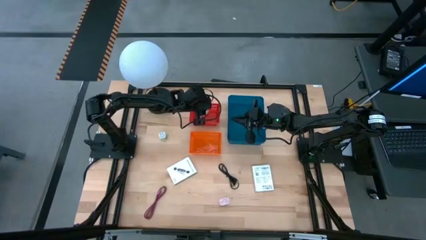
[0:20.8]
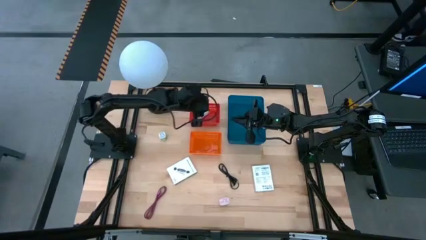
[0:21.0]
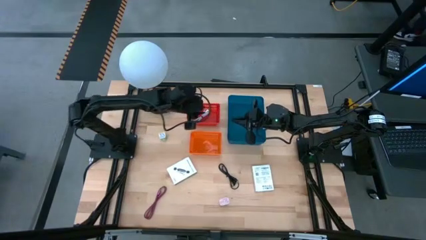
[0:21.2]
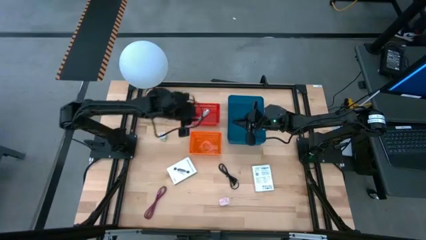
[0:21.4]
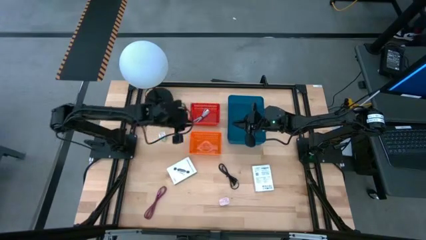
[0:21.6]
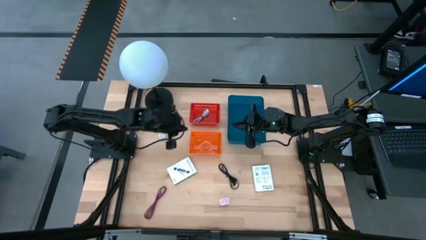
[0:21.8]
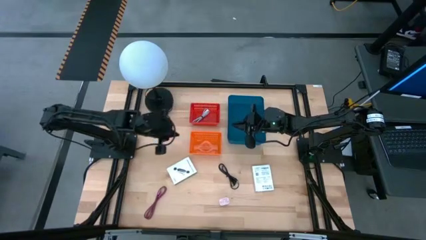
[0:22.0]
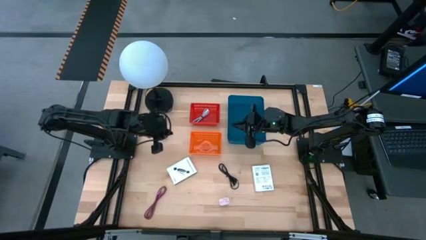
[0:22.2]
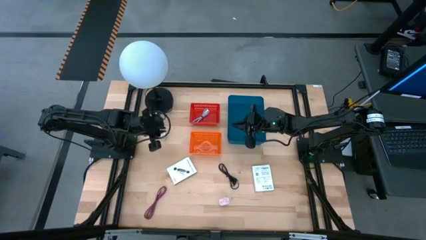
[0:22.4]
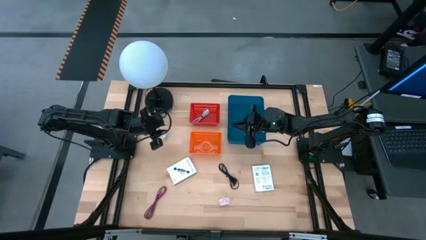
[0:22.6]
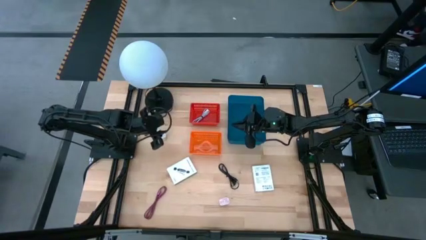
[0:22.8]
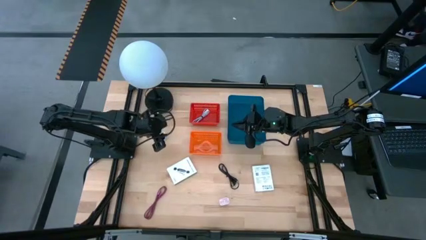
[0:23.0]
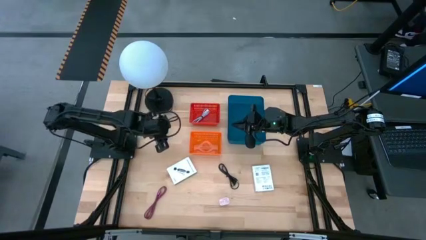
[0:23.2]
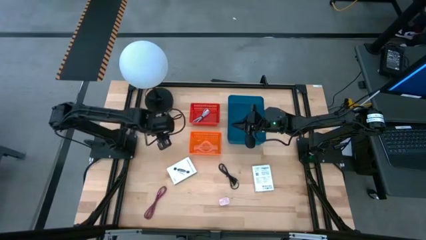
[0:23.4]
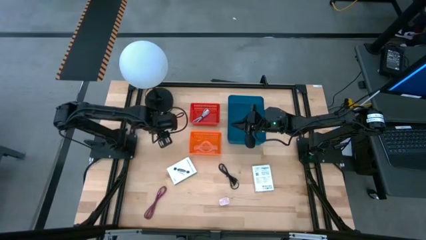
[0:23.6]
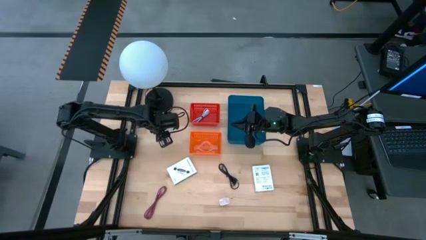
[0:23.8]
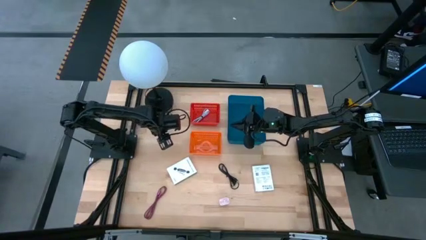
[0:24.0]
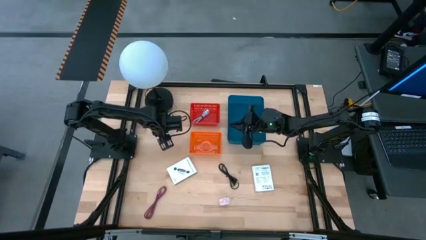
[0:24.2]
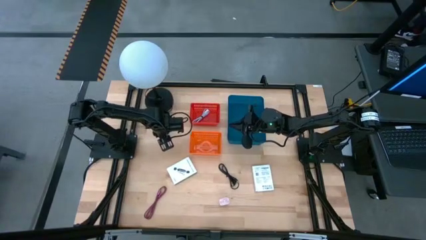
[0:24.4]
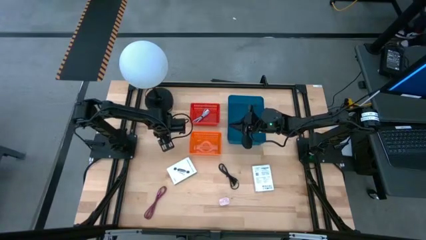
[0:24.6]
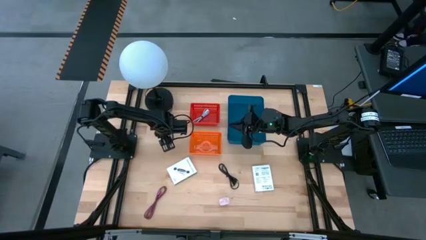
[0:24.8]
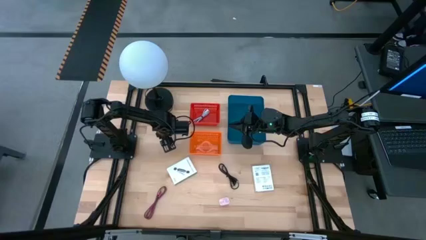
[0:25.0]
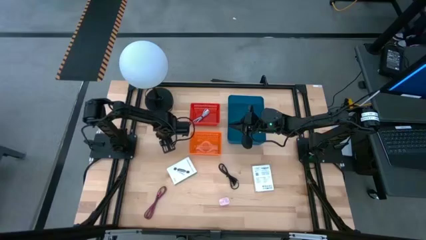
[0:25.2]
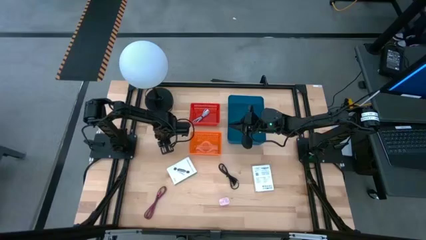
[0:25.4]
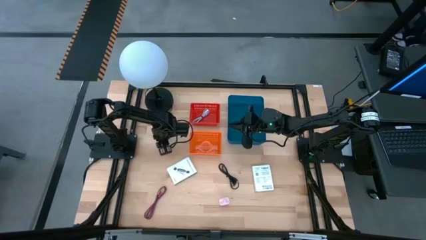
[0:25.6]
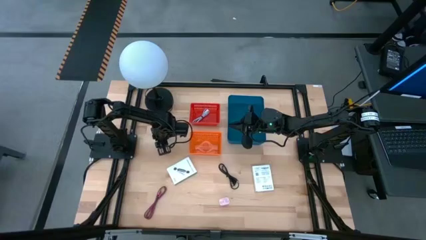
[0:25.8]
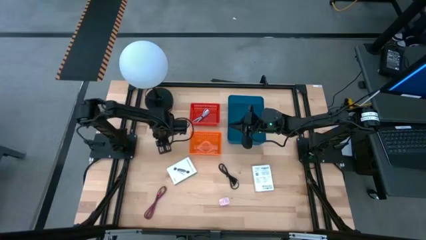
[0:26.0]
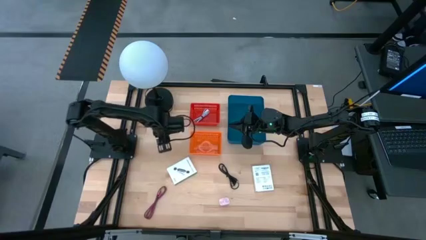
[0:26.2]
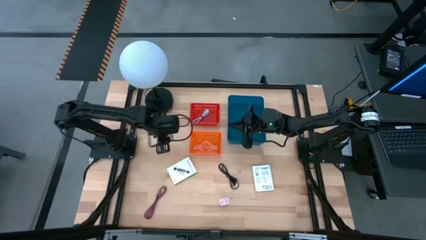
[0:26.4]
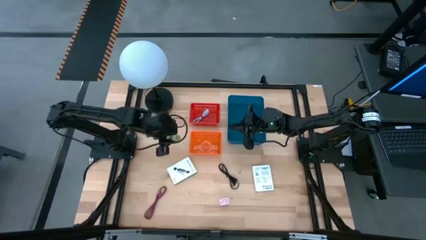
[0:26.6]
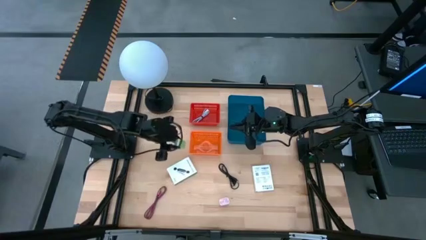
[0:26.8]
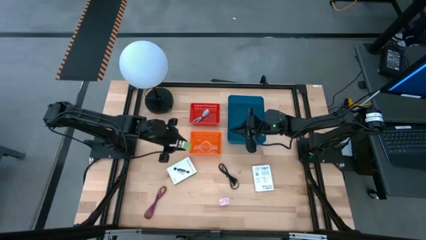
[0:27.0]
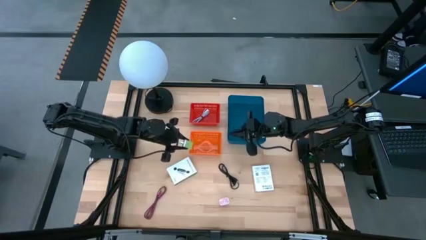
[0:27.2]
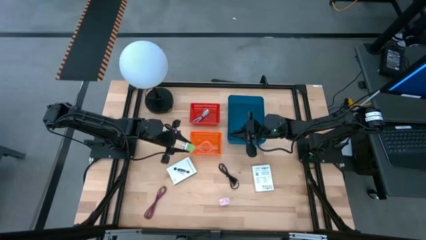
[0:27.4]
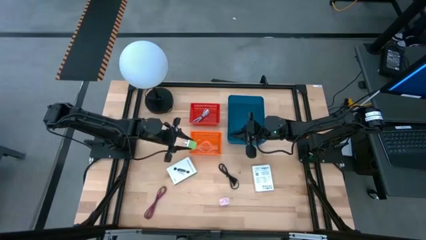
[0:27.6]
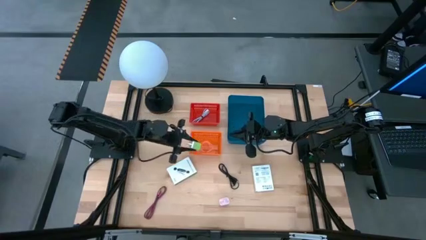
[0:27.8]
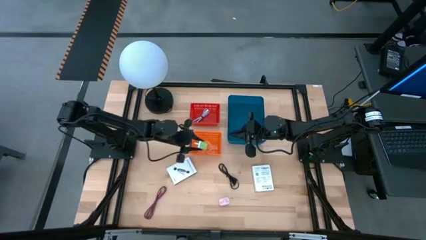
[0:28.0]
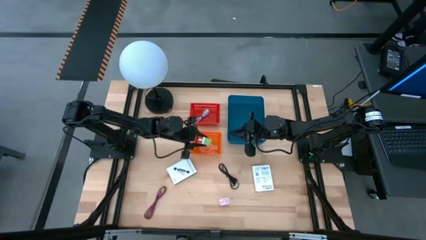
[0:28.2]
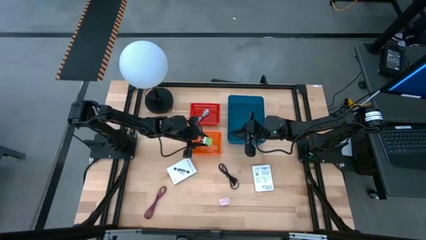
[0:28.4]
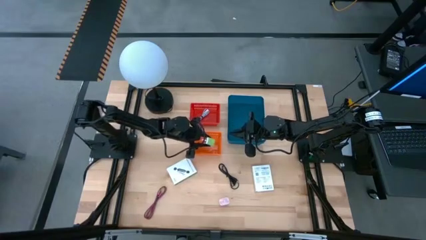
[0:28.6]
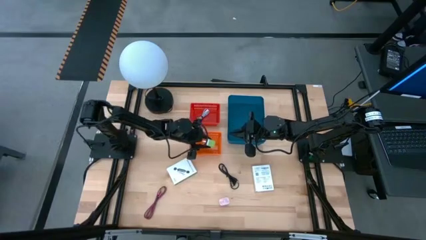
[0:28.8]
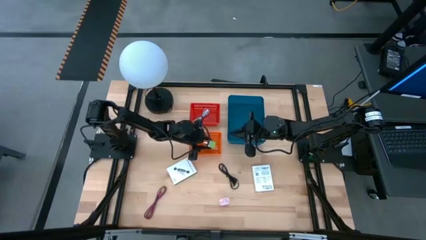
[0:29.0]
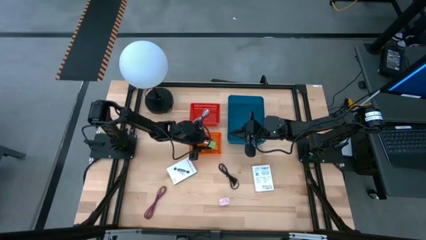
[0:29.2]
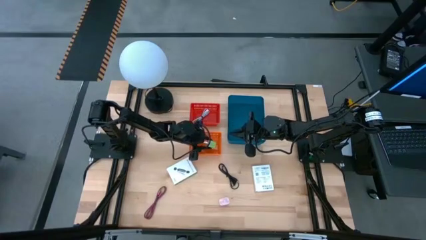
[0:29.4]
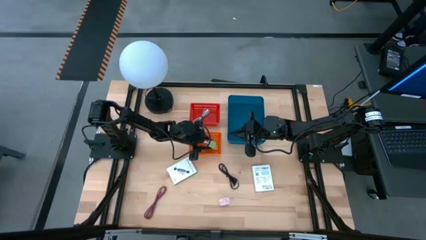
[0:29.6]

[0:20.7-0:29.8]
Task: Pick and place items into bin
Put the light green charger adapter into the orange bin

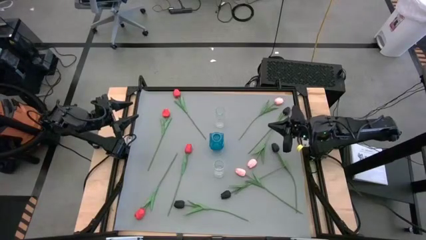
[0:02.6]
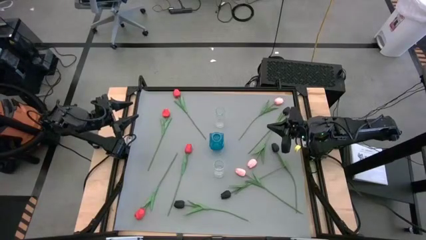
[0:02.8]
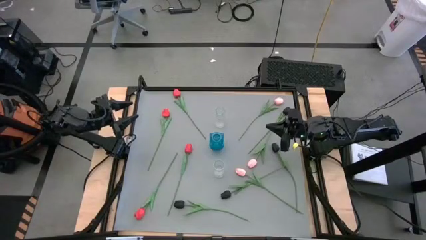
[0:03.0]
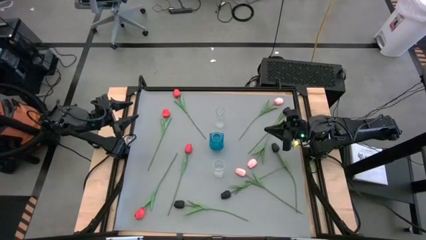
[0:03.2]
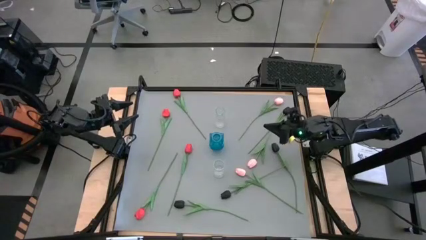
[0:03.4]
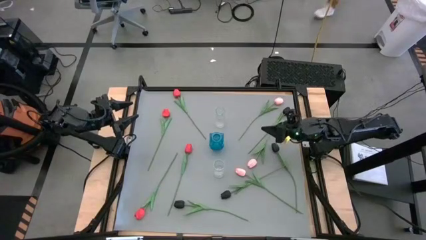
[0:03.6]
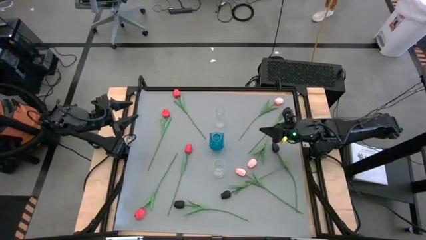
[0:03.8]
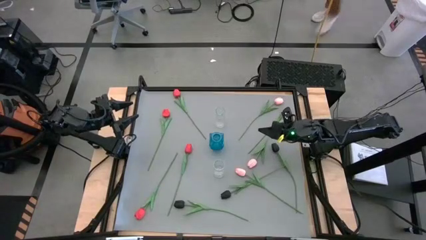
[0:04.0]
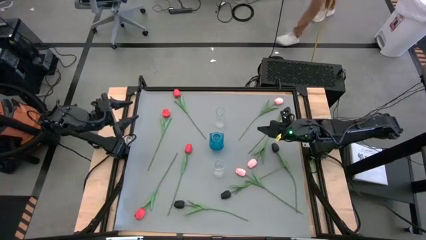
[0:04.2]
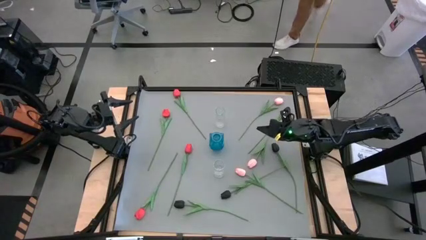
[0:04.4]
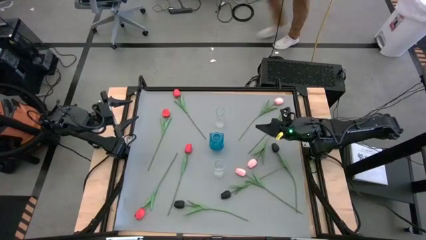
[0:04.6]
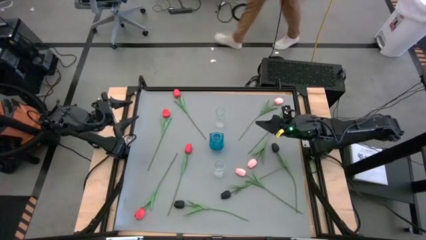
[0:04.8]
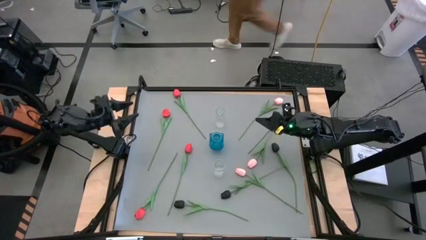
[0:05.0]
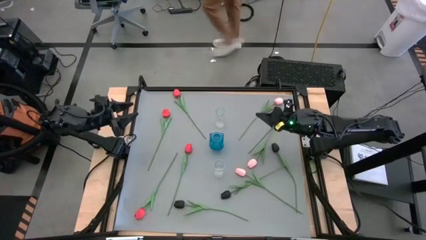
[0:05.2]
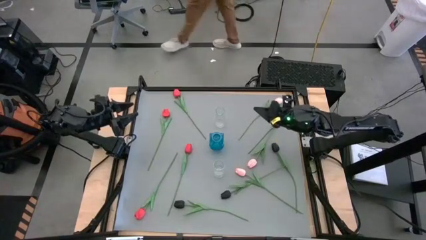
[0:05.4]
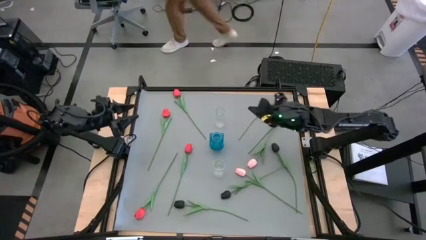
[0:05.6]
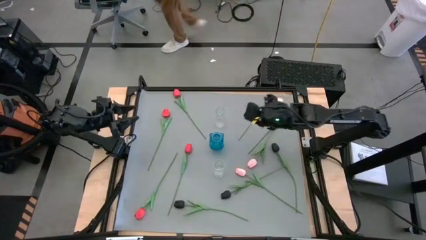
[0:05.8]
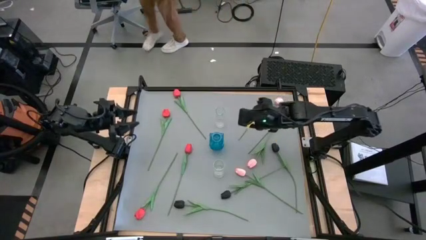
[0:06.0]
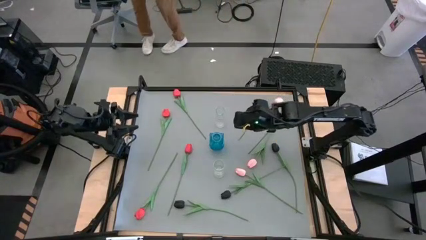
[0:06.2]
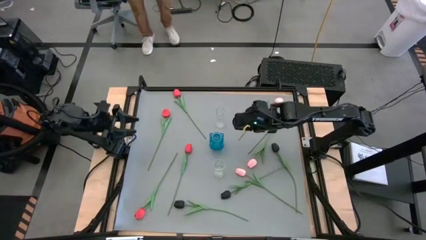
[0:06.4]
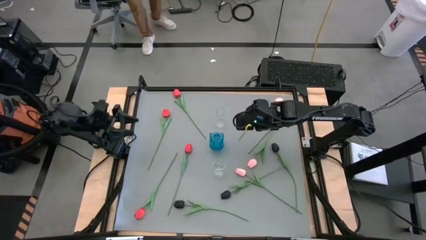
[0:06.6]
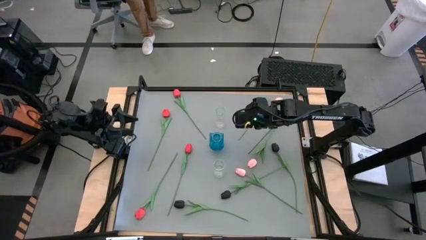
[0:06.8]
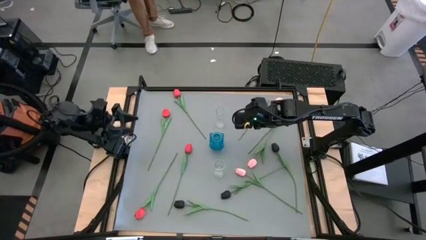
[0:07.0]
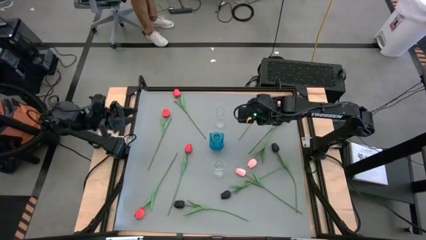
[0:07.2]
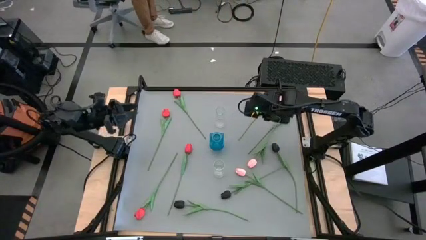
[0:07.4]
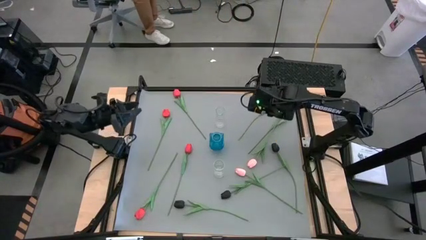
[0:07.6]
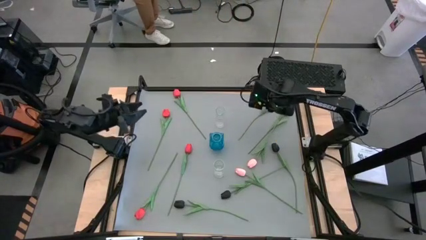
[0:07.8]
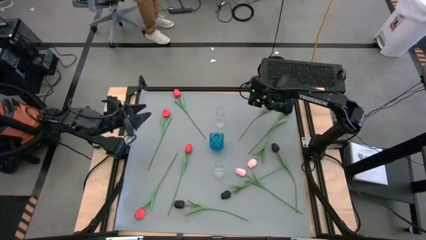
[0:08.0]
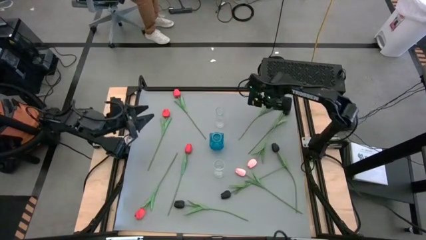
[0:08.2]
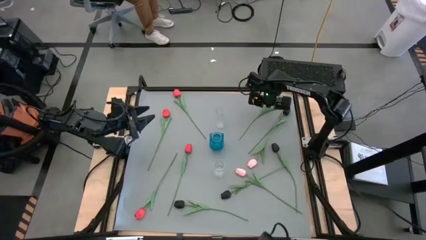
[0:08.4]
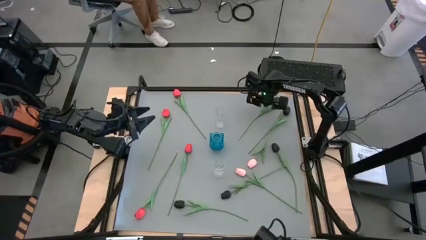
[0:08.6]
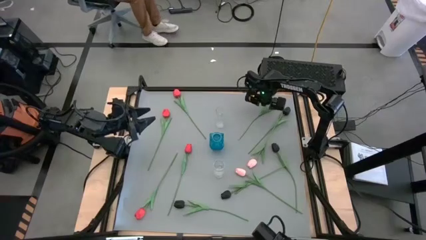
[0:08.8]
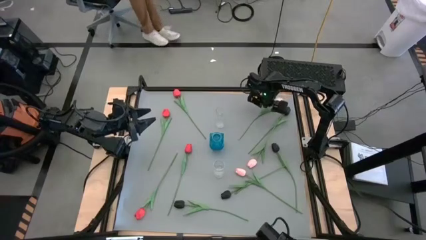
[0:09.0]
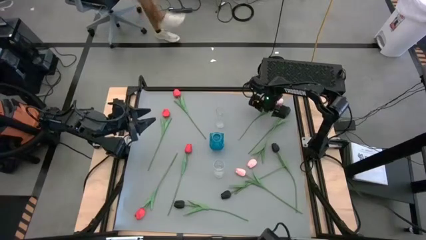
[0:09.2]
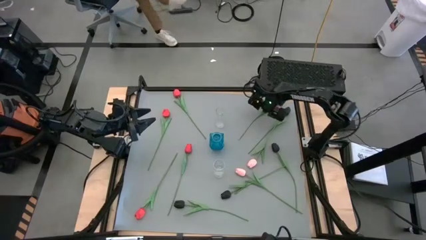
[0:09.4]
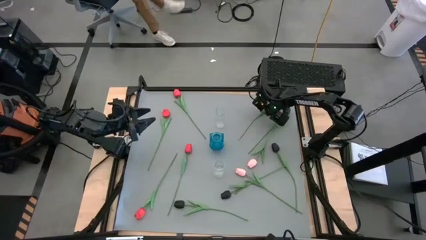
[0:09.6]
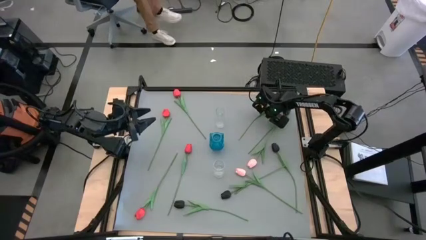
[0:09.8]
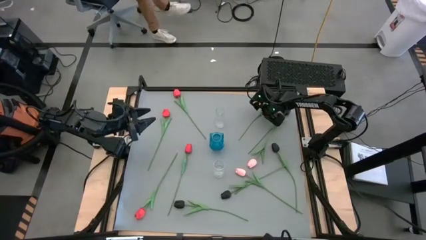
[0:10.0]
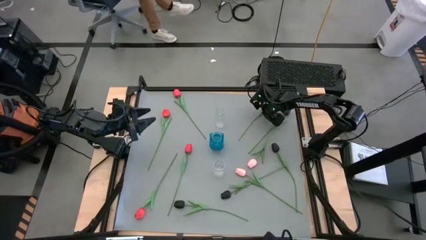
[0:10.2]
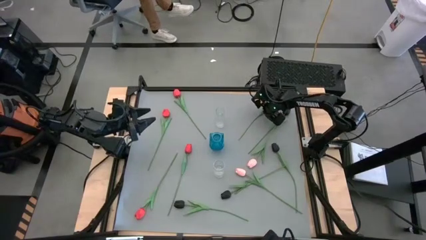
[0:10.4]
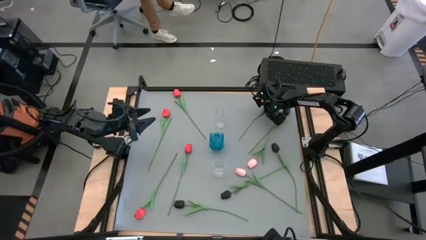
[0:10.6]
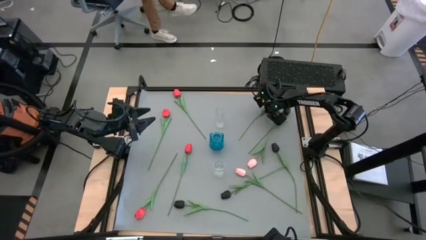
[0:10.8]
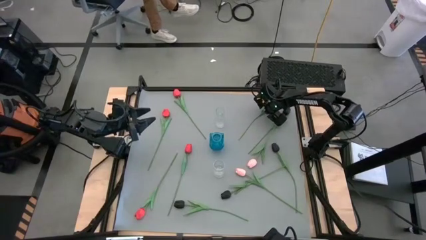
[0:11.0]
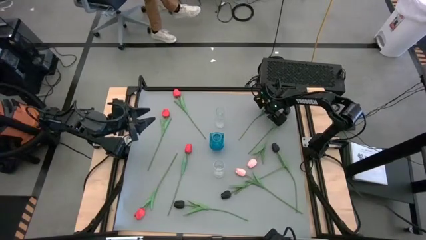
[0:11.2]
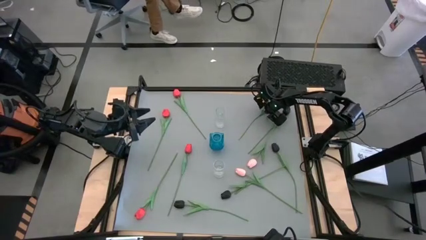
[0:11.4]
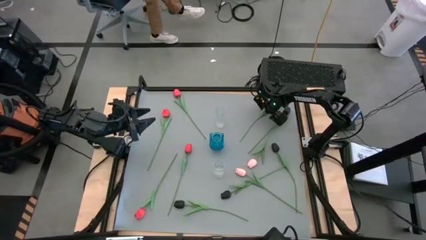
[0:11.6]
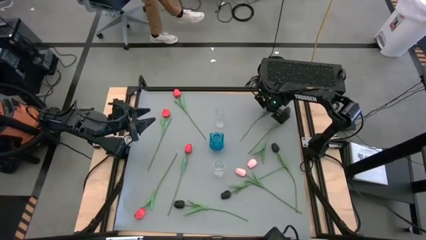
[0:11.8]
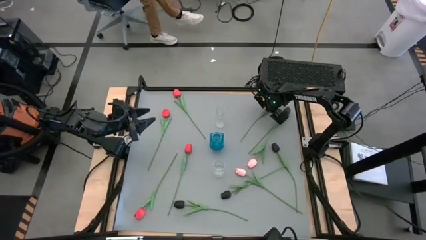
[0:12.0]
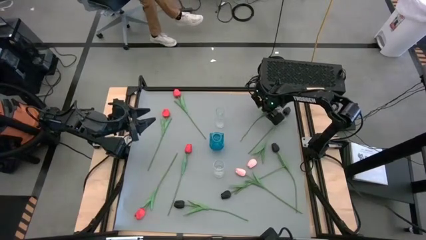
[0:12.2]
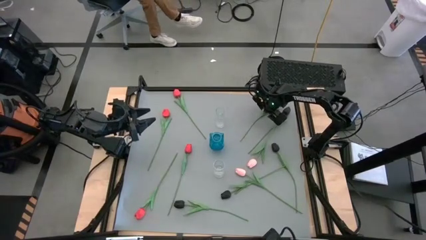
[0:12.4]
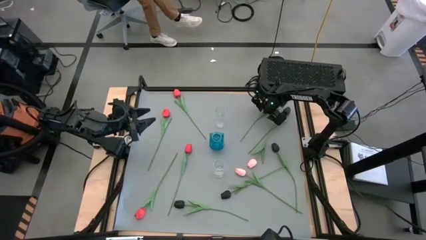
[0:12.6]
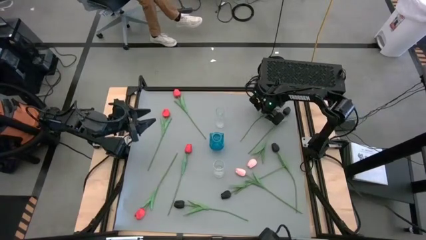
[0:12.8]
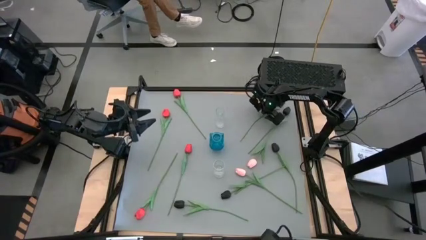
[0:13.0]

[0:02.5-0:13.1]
Task: Sort flowers into vase by color
Put the top pink tulip into the top transparent vase
